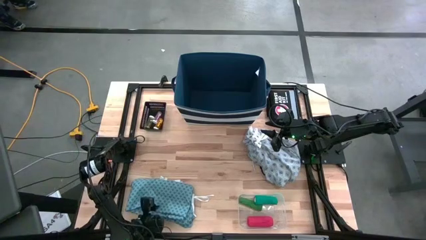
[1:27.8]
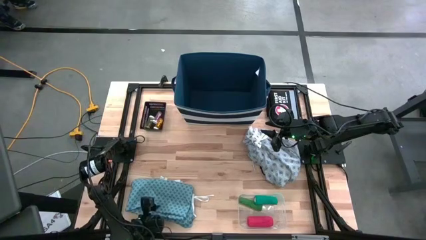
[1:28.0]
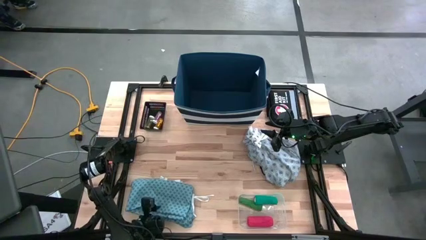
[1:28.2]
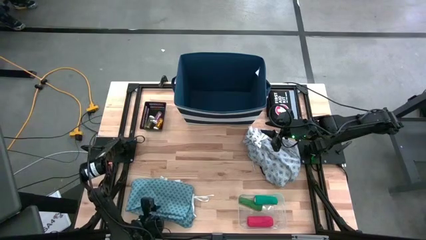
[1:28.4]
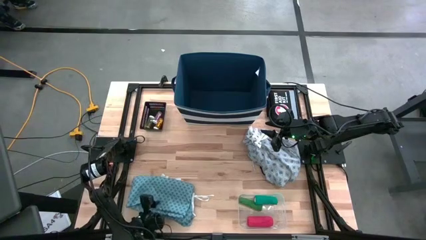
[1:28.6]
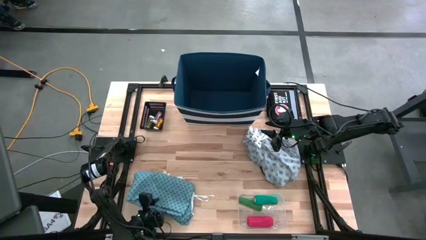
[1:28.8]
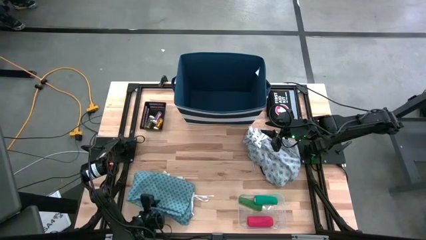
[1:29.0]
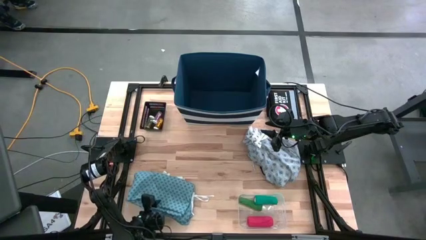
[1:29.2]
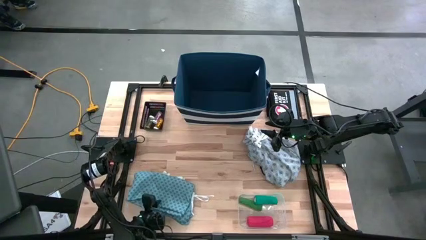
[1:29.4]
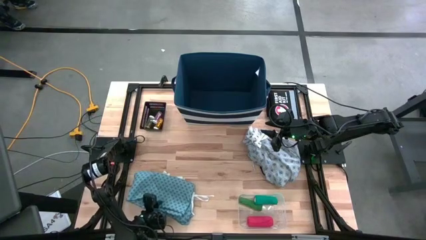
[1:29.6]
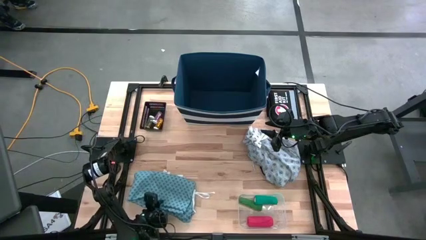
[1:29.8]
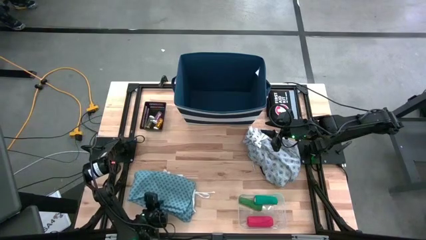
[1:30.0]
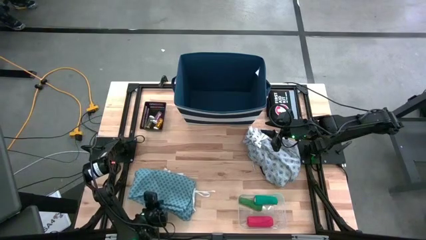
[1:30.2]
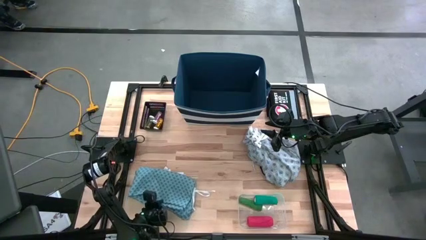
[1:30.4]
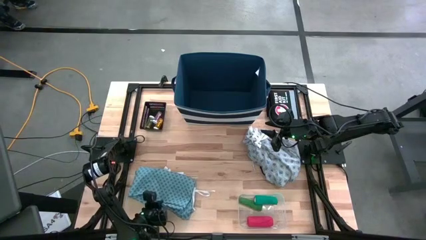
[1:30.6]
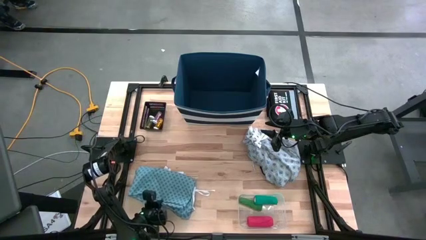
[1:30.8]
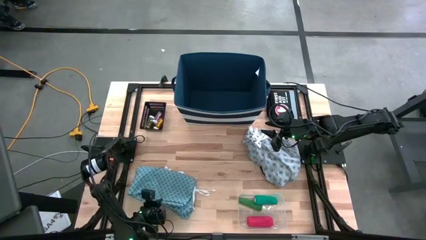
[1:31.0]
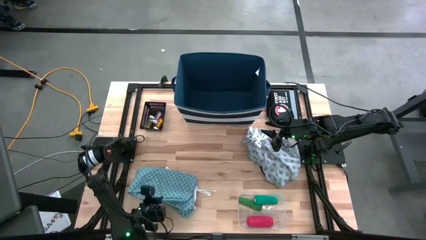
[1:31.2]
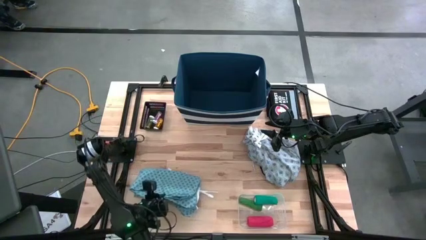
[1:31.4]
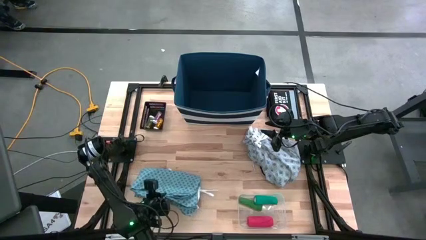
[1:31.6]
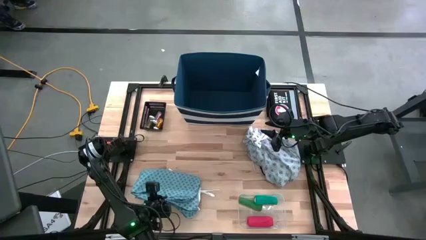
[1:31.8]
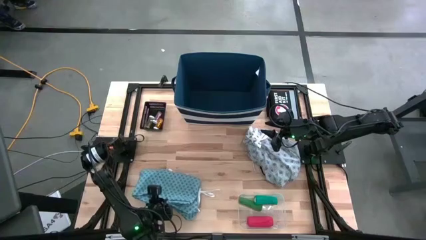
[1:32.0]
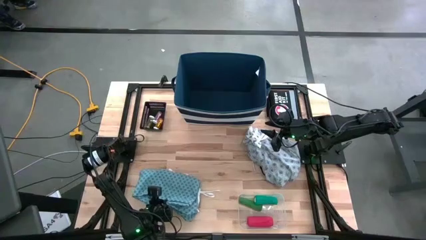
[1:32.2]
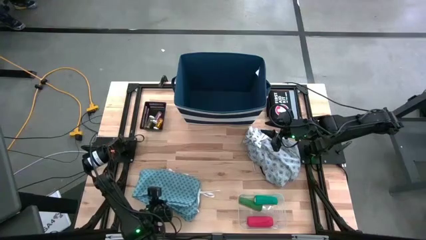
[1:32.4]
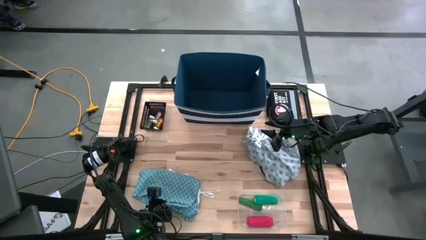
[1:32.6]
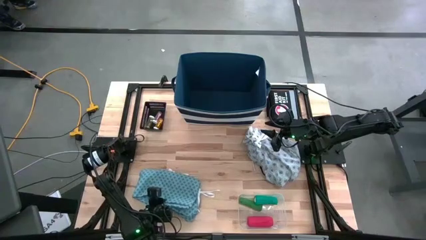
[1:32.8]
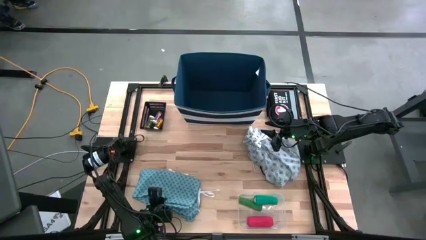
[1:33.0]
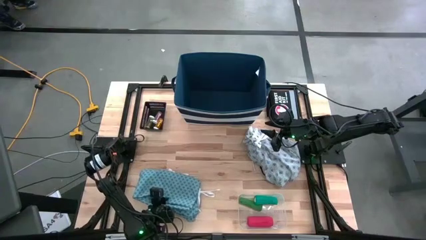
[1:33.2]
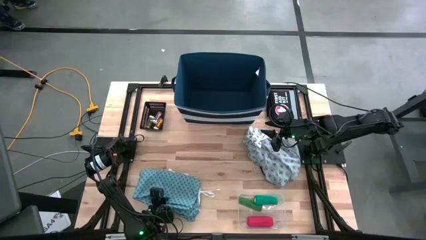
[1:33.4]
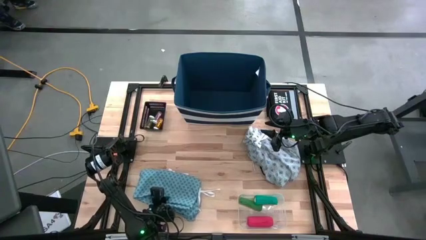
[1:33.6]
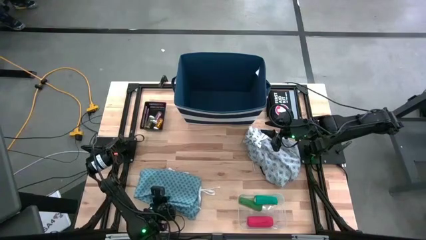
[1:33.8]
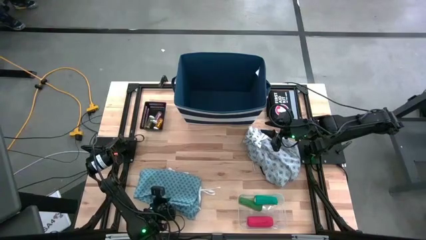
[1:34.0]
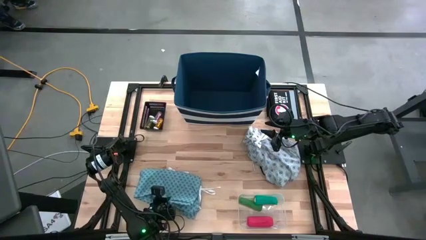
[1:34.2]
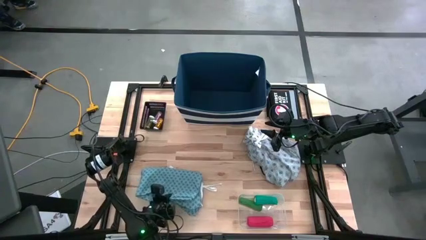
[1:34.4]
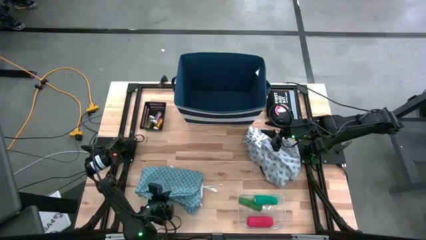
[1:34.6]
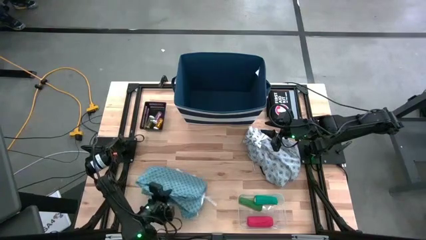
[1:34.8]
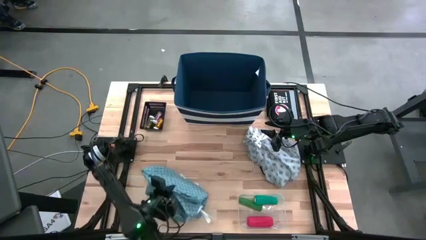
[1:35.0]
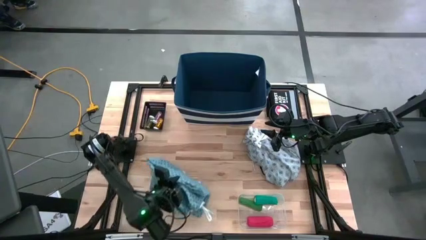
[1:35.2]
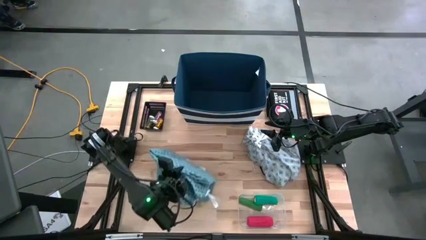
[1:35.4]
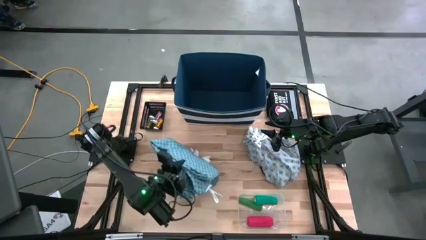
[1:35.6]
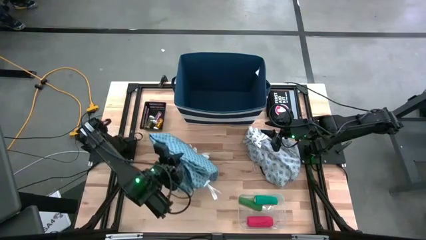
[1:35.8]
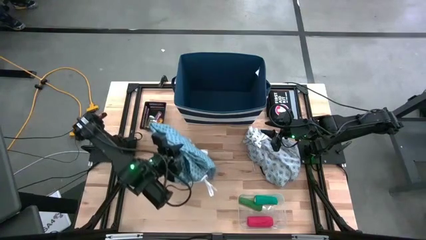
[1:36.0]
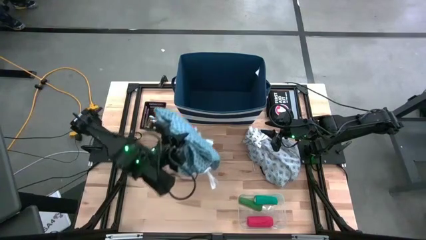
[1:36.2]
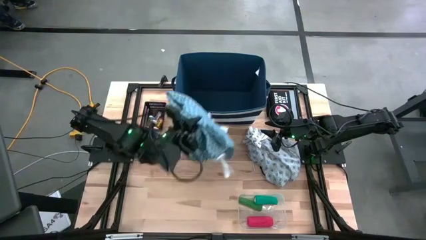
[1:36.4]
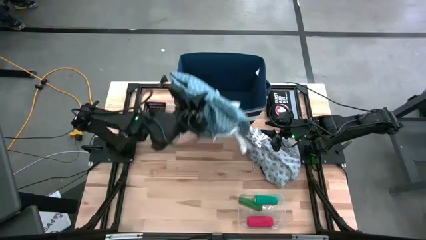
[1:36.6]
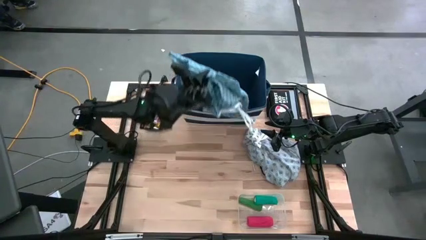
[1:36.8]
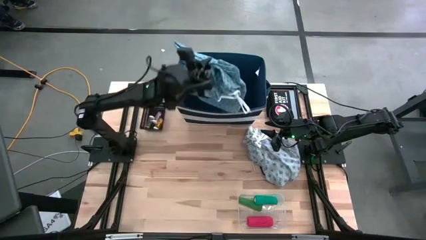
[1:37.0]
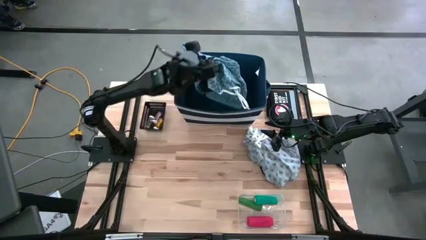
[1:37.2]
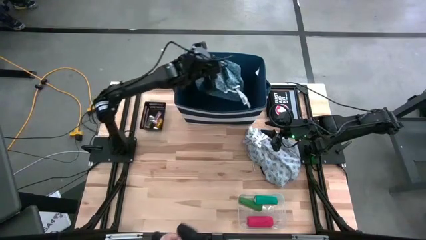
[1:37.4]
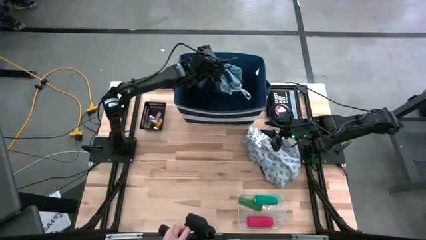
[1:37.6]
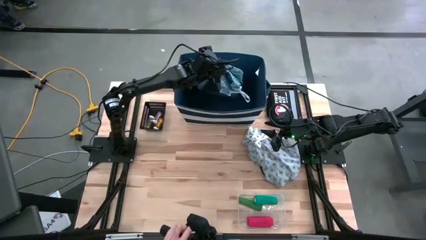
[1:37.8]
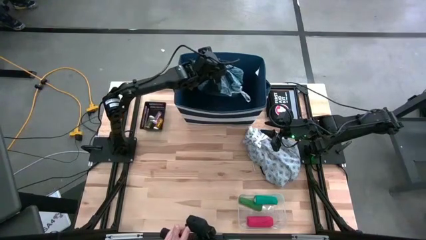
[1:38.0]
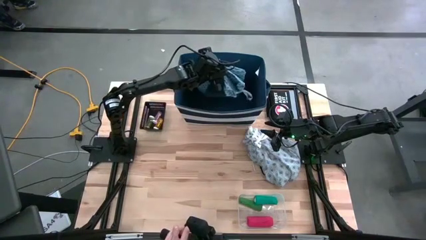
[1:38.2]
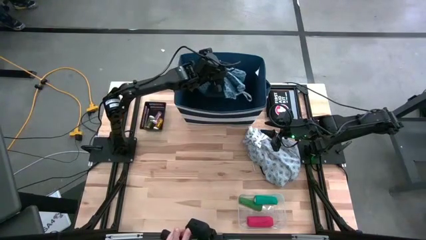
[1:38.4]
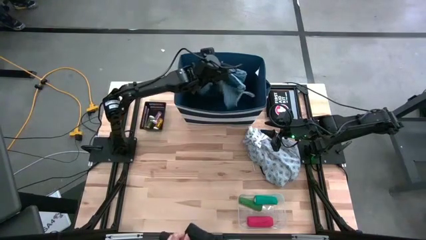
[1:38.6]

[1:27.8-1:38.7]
Task: Pick & Place Medicine items
Put the light blue patient gown into the laundry bin

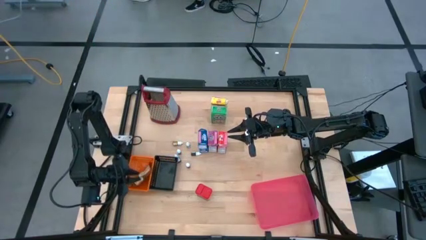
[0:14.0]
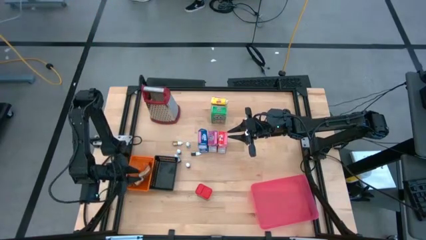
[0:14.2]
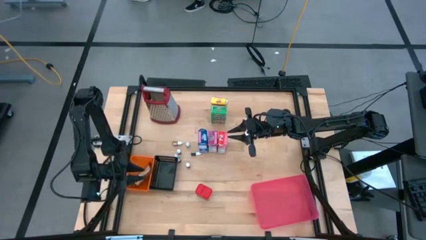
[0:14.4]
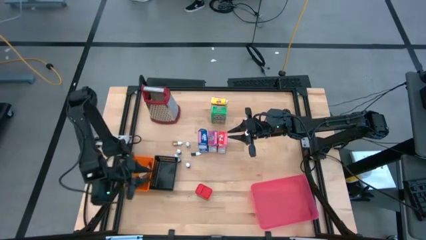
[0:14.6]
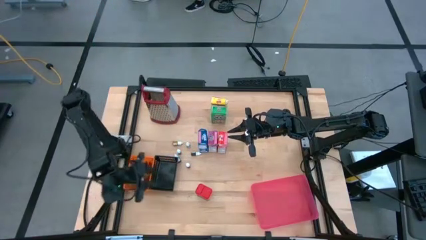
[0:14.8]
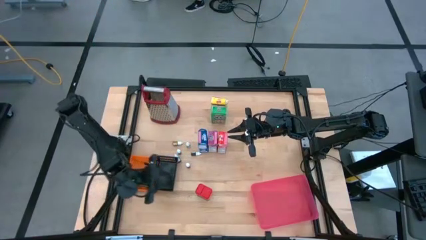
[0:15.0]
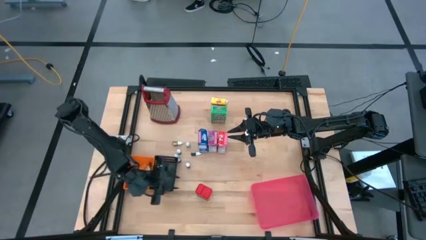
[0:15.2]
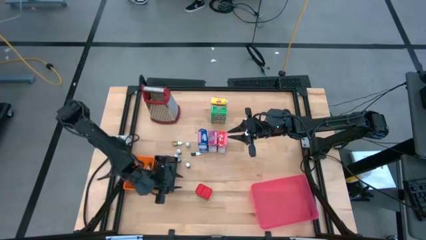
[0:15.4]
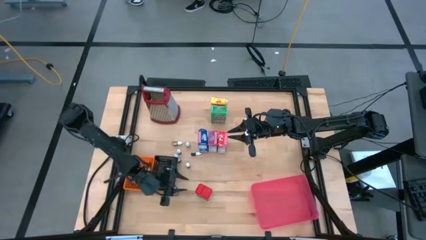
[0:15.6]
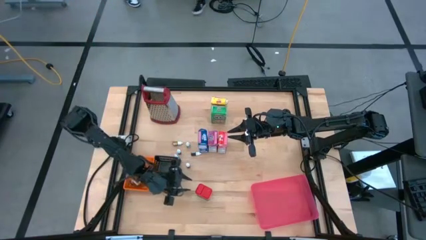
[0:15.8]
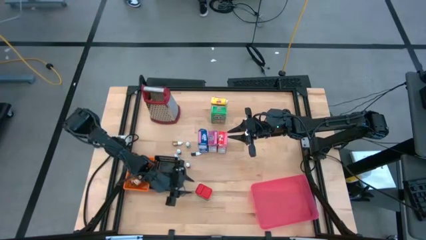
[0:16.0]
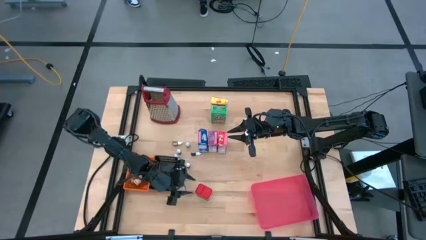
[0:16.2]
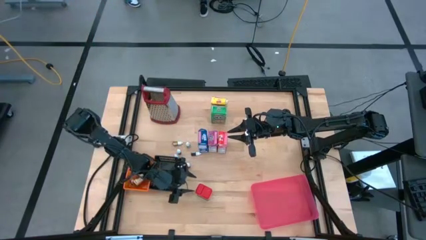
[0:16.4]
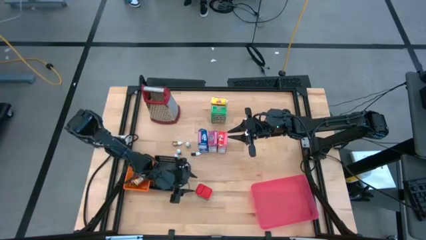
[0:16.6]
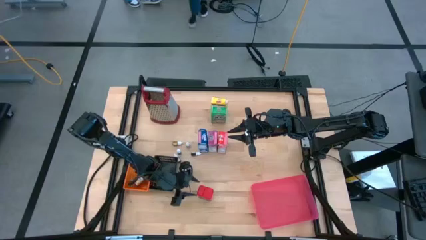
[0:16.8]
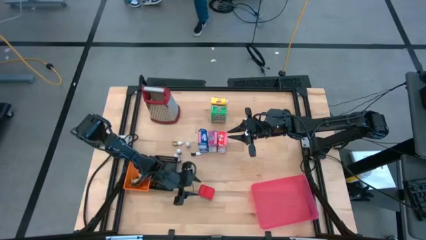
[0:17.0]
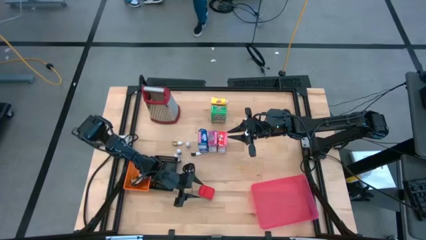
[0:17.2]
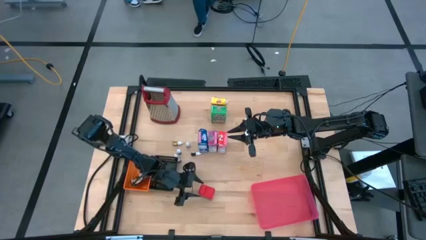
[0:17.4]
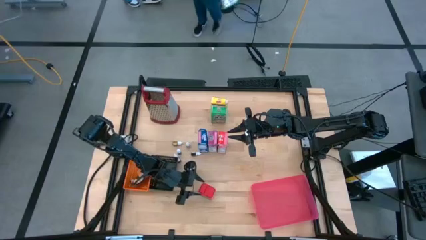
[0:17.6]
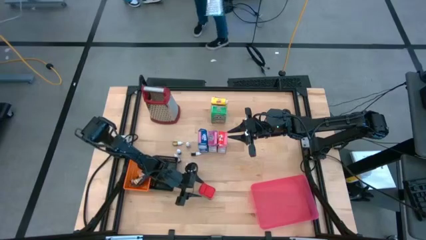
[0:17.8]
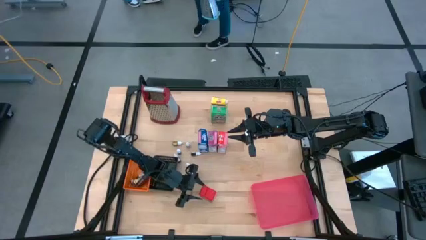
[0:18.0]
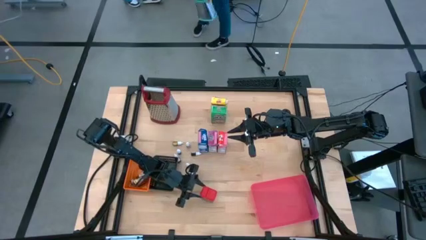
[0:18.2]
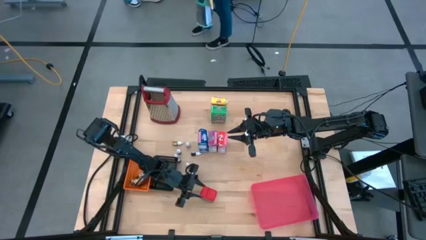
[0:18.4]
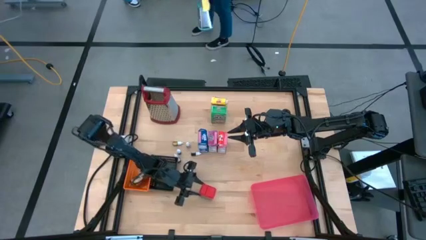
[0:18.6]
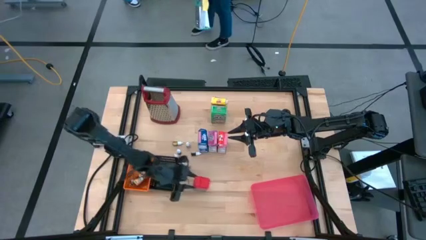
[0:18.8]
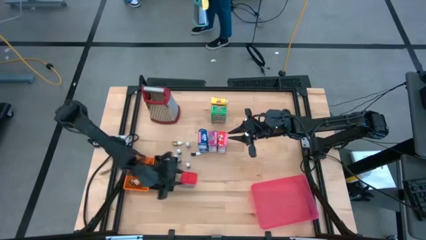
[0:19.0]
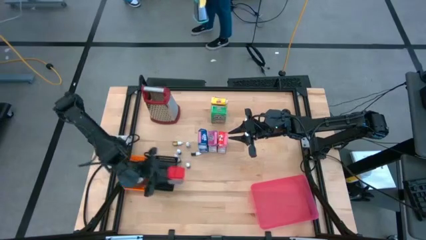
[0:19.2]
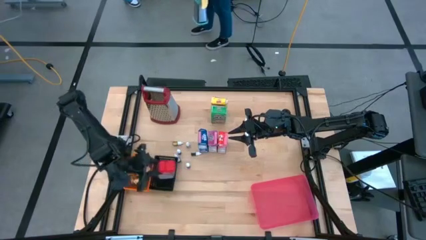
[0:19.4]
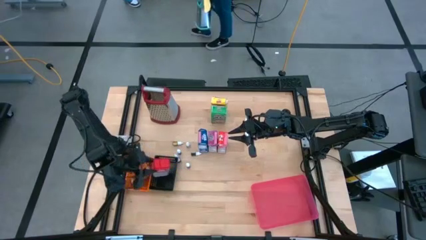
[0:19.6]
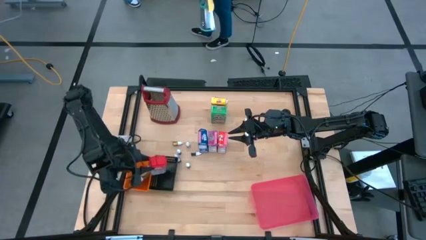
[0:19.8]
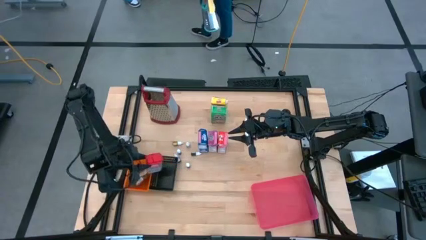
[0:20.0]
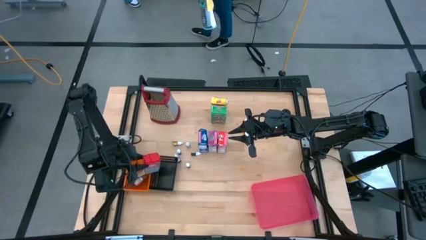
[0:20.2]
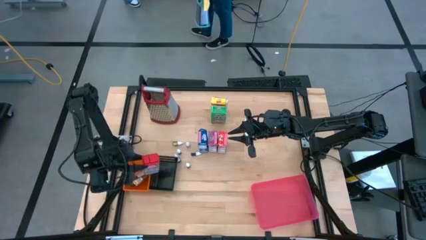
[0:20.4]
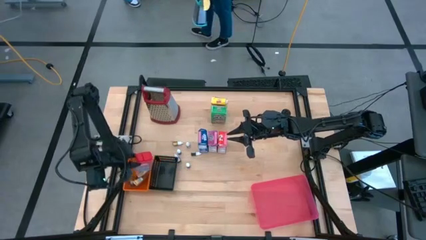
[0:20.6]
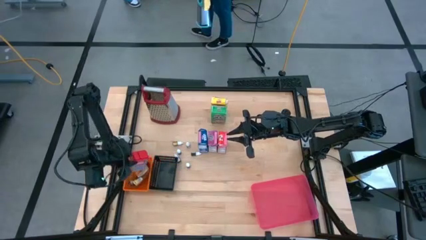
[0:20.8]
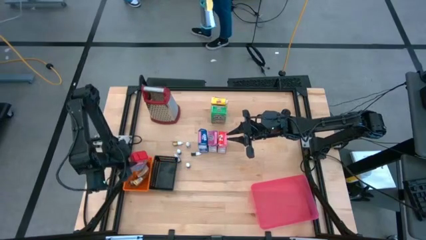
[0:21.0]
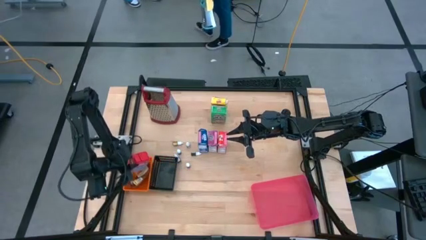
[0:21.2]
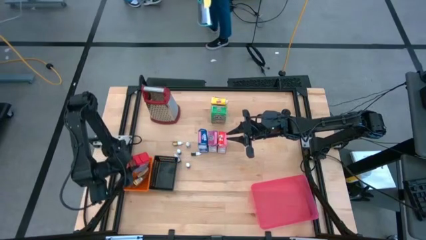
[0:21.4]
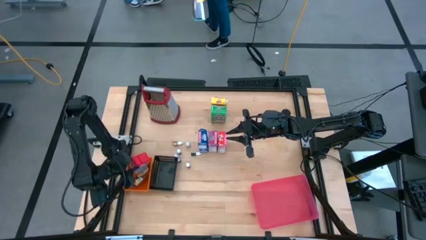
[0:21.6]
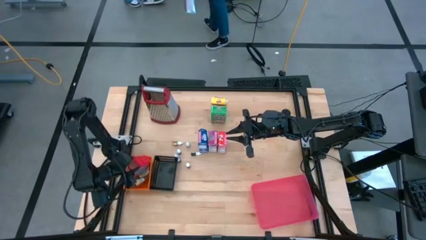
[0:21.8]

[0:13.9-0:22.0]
Task: Pick & Place Kitchen Items
Put the red spice can into the orange bin
